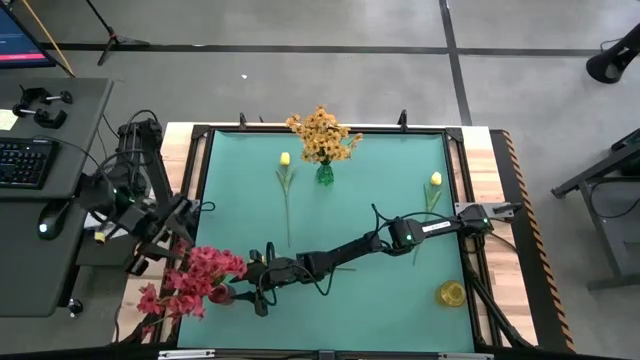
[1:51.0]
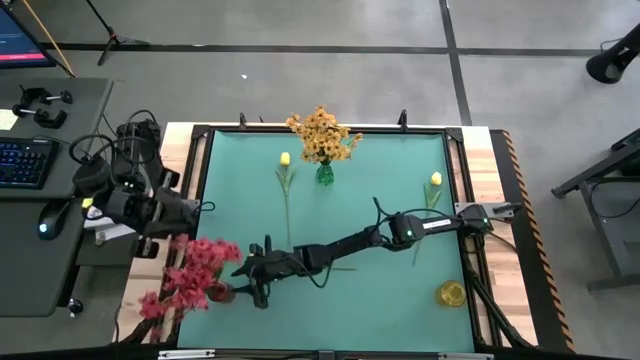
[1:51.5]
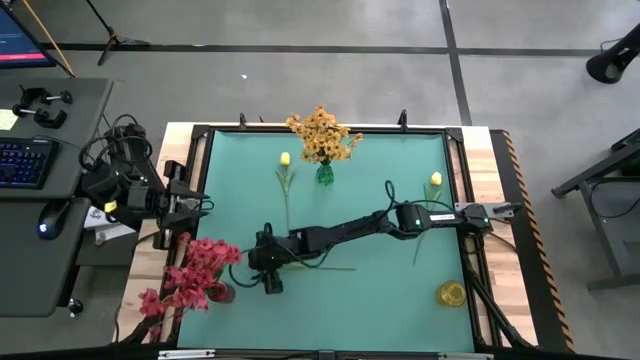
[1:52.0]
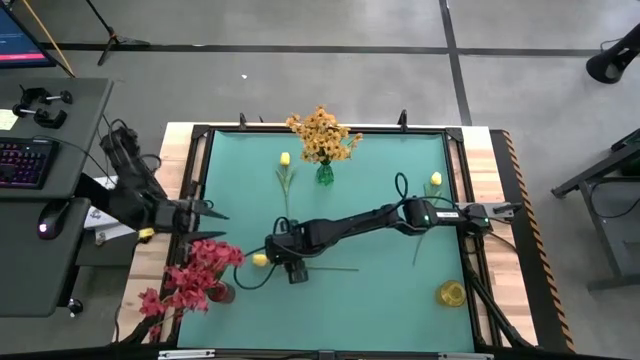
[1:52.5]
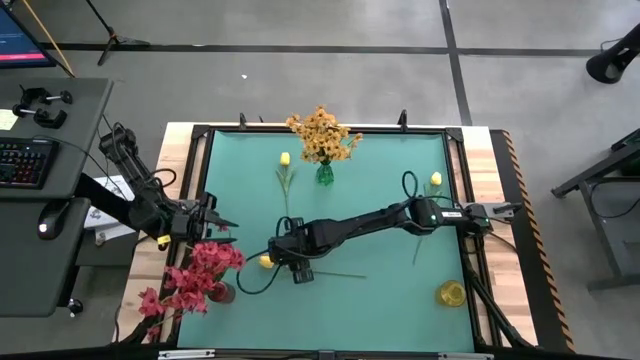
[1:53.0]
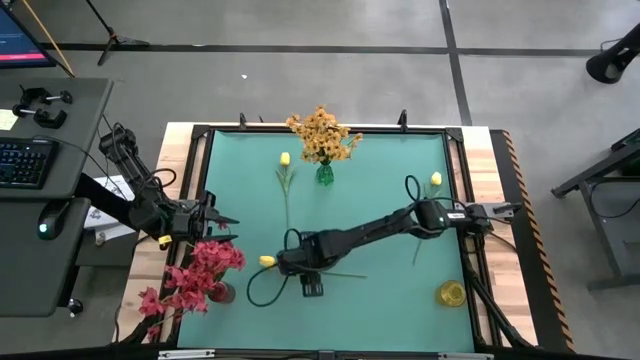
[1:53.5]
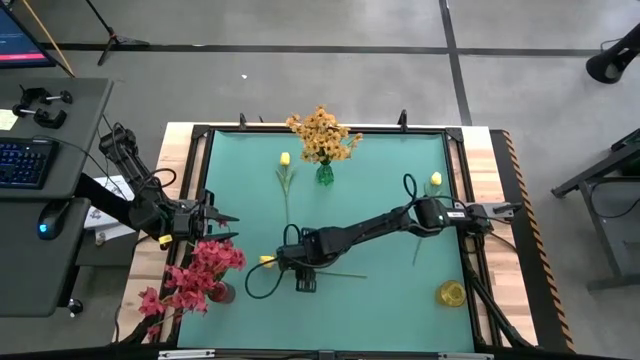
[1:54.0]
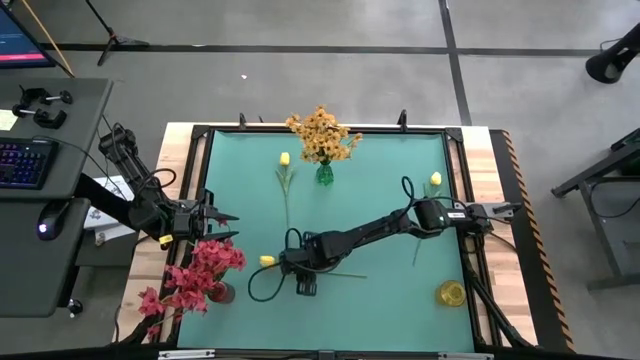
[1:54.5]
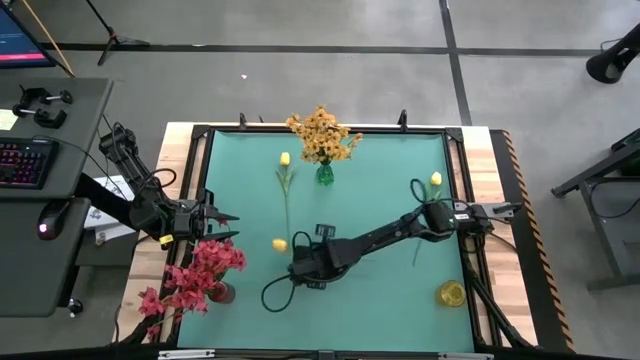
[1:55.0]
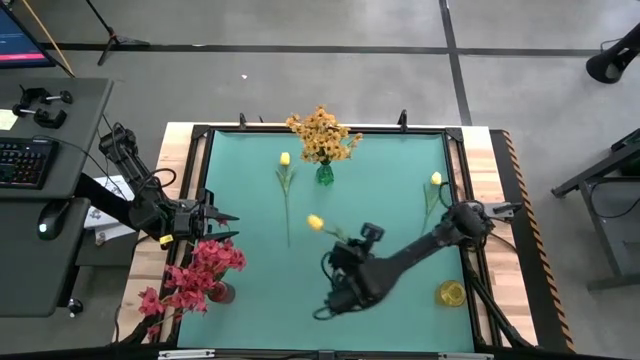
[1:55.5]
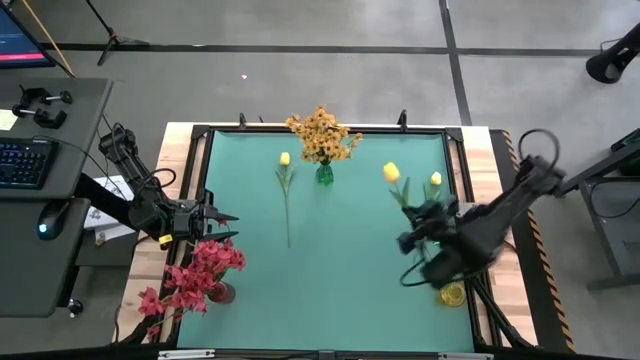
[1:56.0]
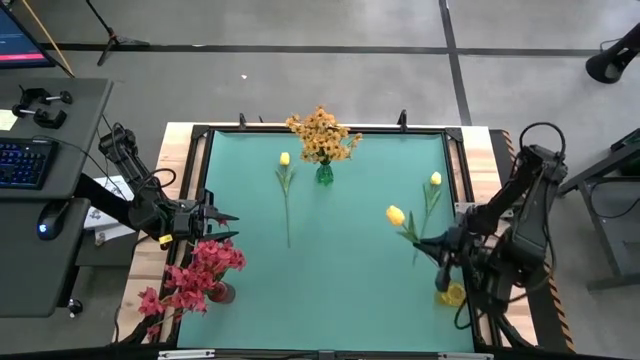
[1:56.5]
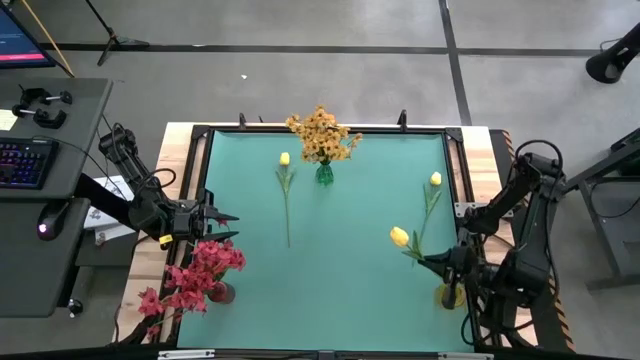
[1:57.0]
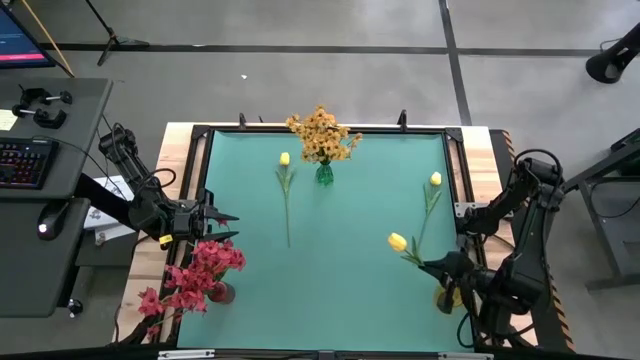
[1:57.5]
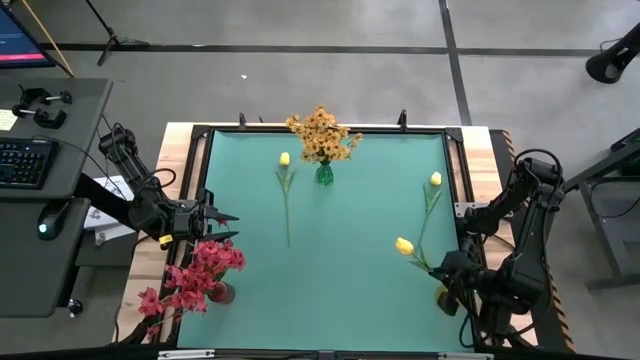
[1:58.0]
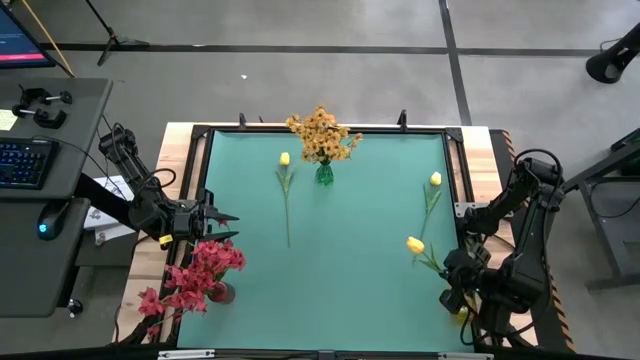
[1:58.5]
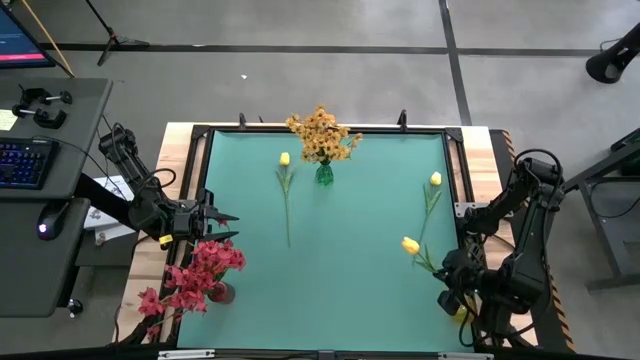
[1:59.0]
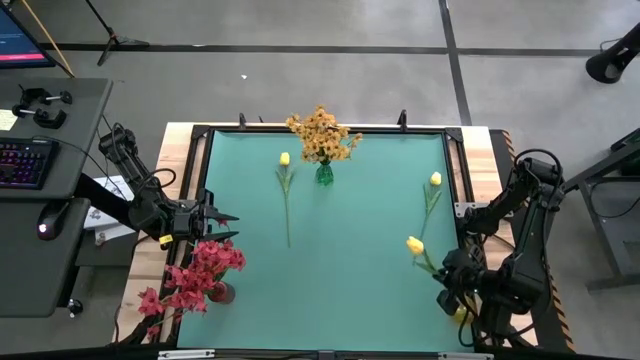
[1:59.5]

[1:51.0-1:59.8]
Task: Sort flowers into vase by color
Put the bottom light yellow flower into the yellow flower

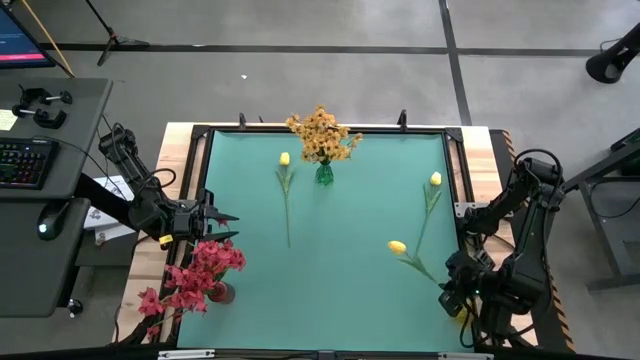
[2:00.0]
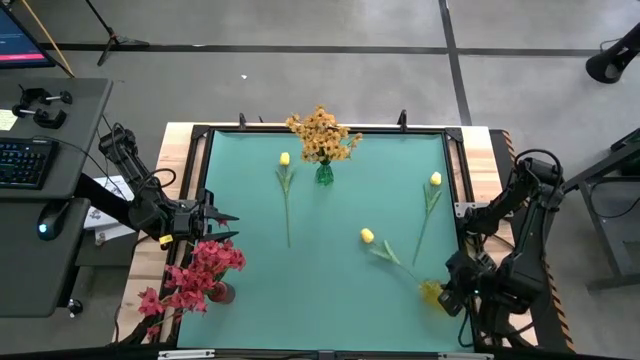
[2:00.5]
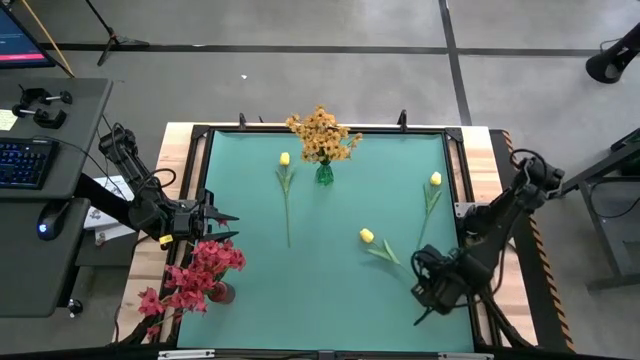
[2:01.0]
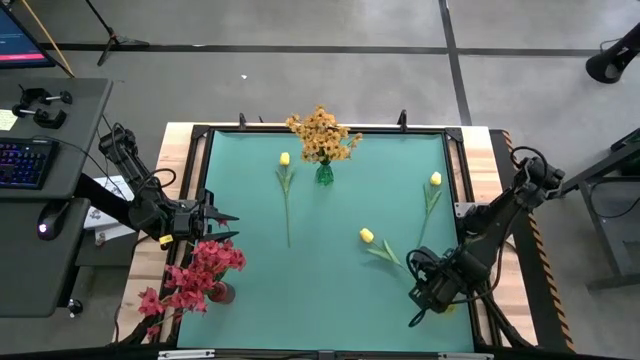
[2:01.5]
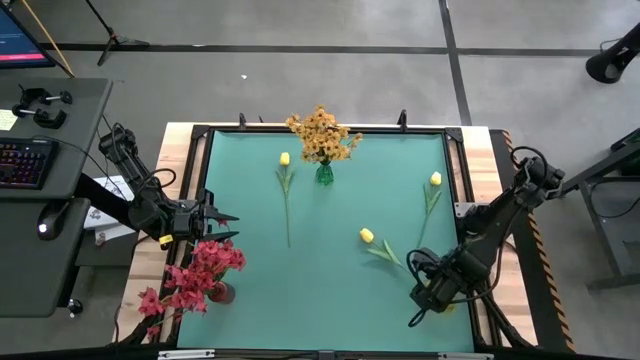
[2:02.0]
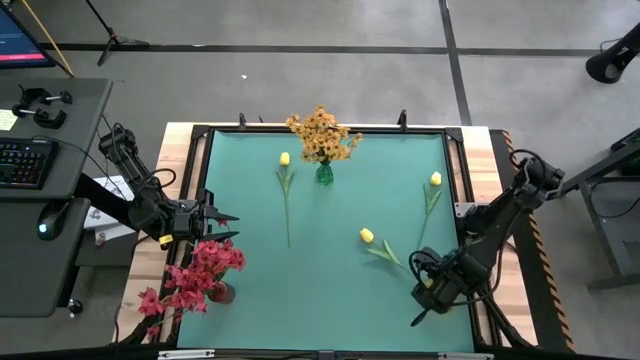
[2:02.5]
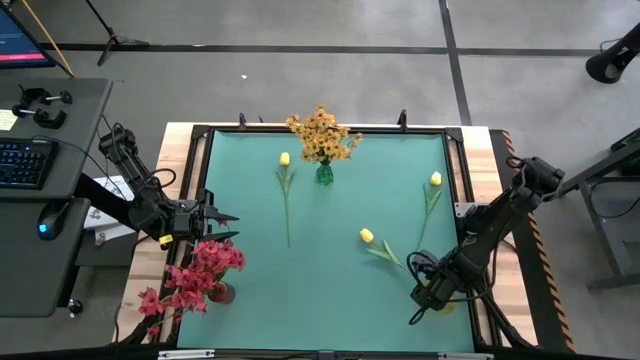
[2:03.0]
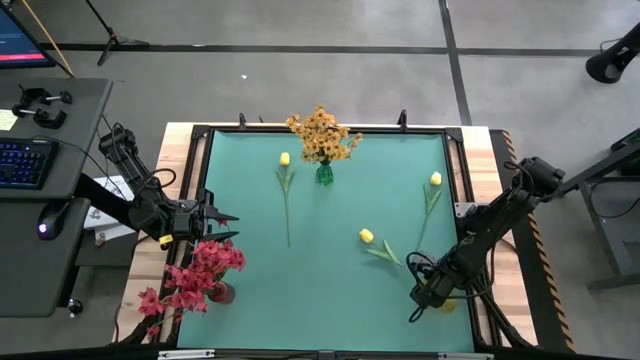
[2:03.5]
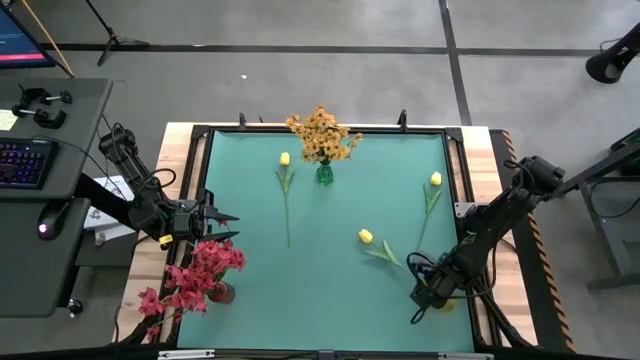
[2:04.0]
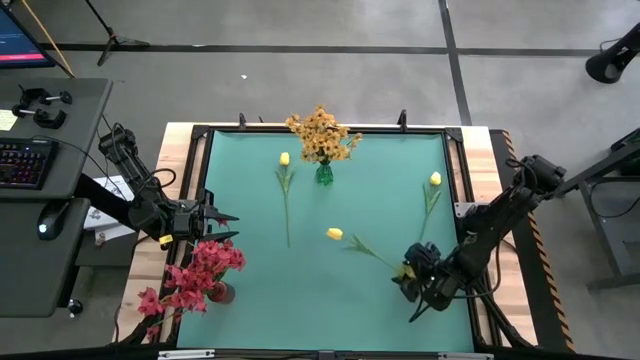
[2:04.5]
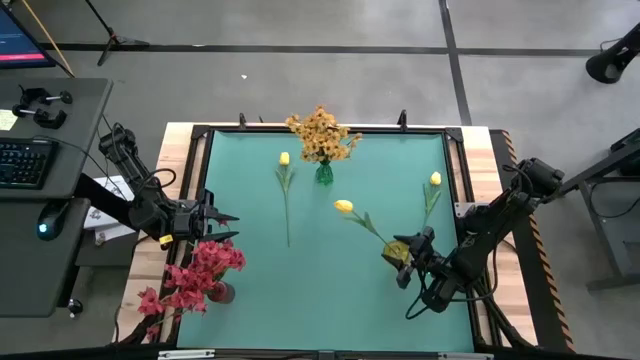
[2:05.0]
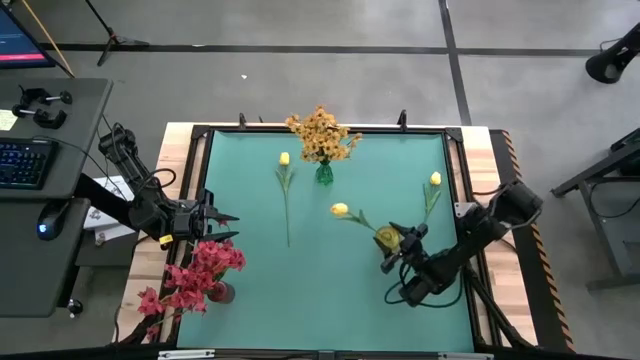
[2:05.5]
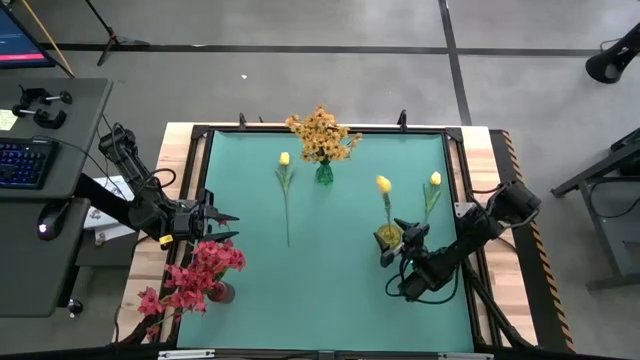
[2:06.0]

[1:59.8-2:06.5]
Put the bottom light yellow flower into the yellow flower

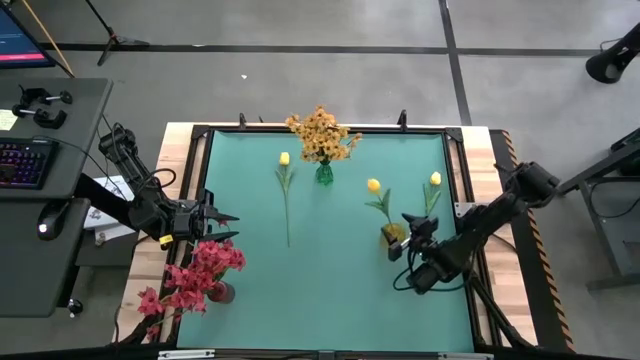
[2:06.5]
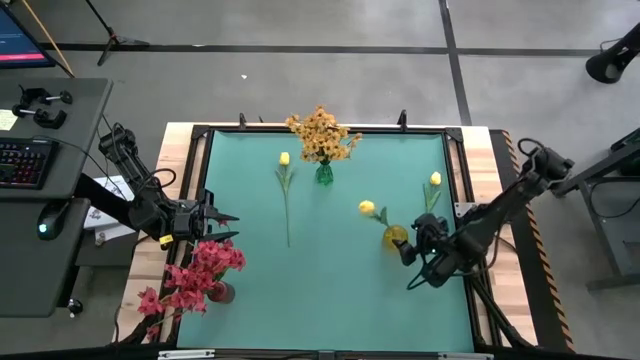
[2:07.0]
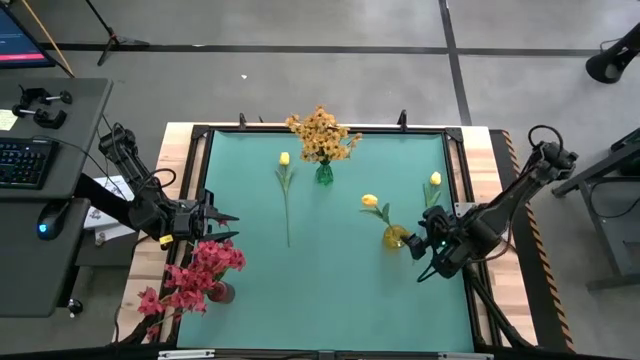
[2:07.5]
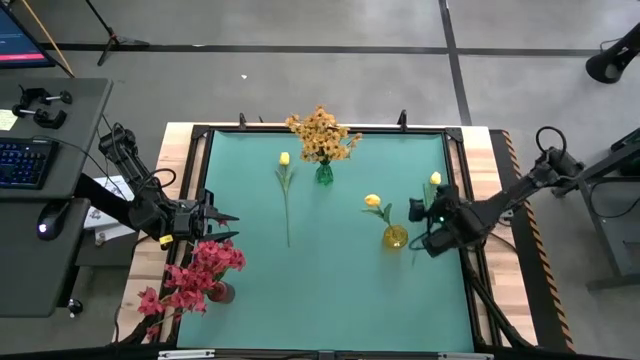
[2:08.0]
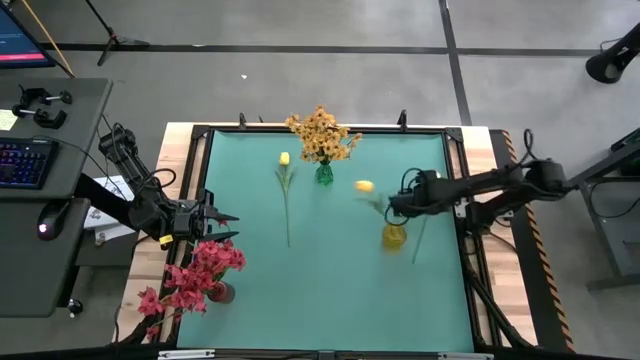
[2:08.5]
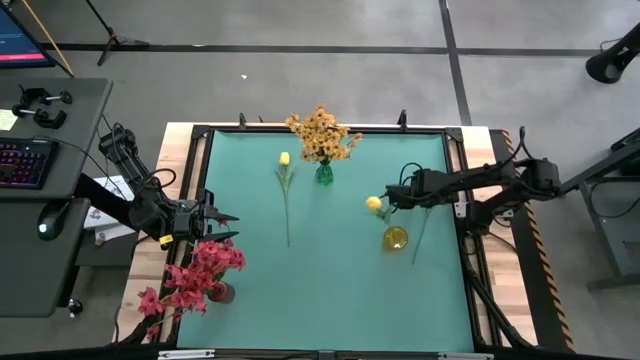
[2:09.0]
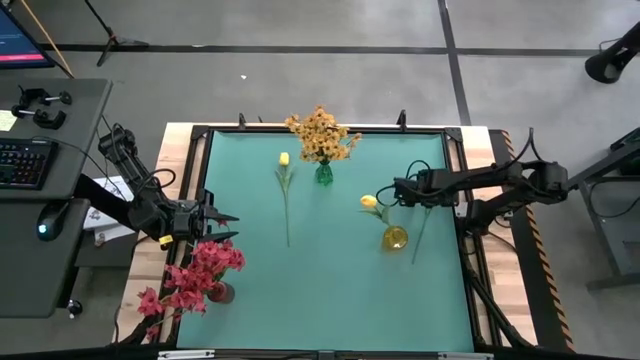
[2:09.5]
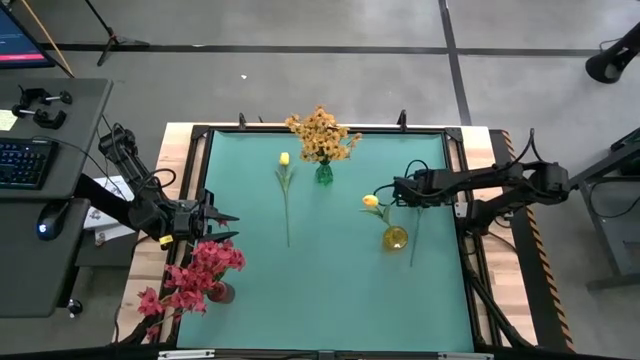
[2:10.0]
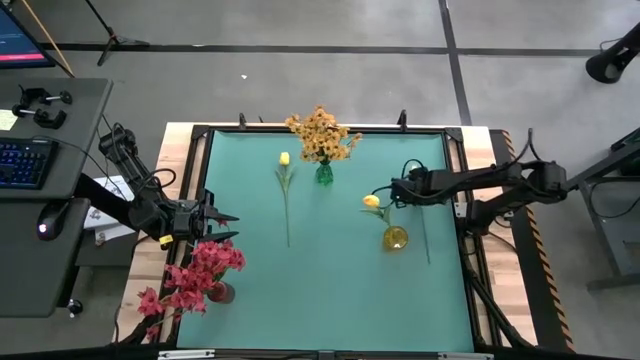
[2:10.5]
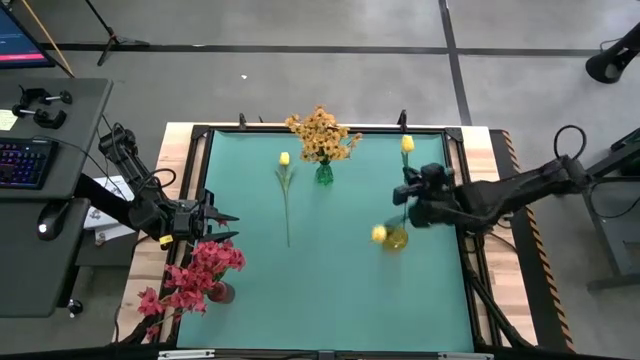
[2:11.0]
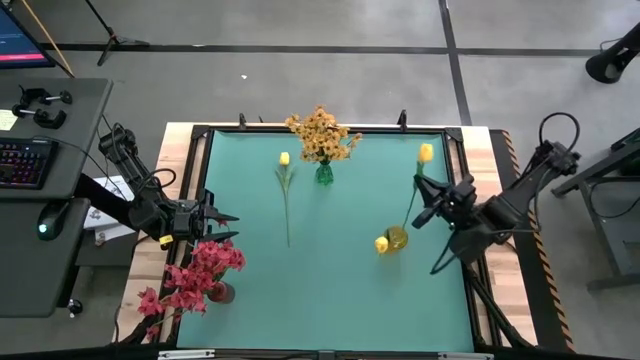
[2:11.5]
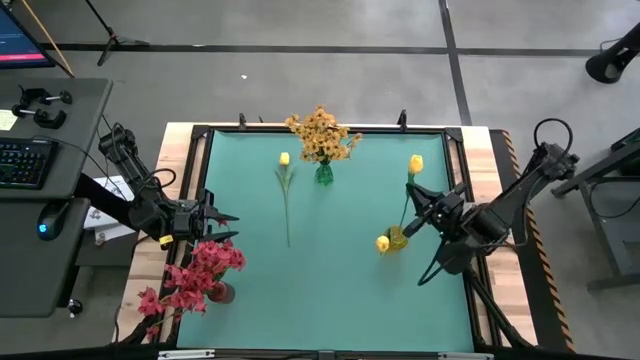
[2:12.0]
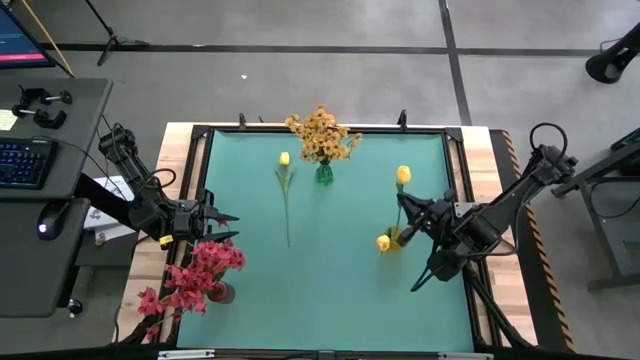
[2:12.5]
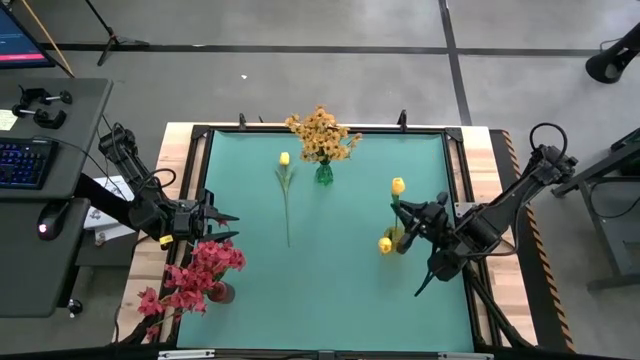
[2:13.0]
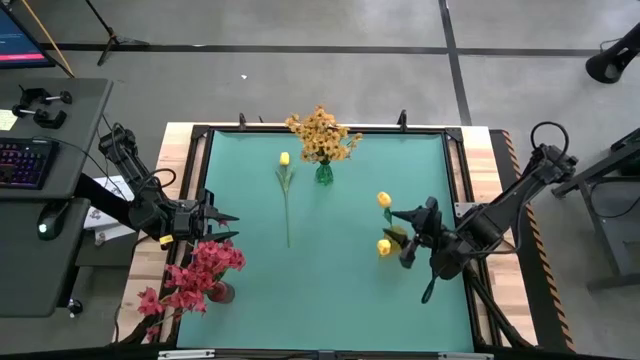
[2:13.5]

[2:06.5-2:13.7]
Put the right light yellow flower into the yellow flower
